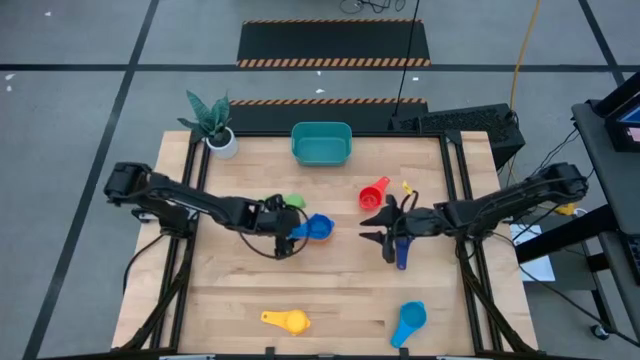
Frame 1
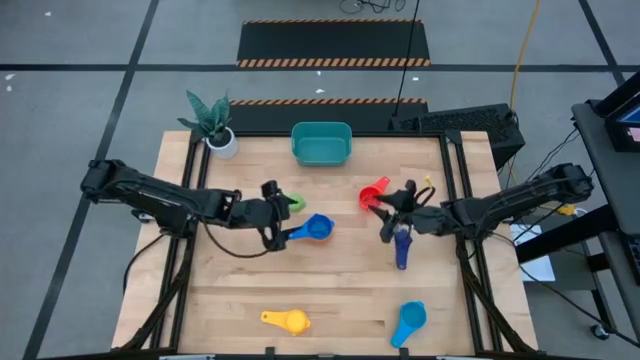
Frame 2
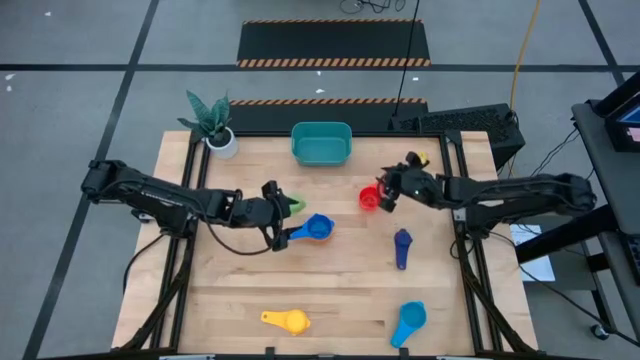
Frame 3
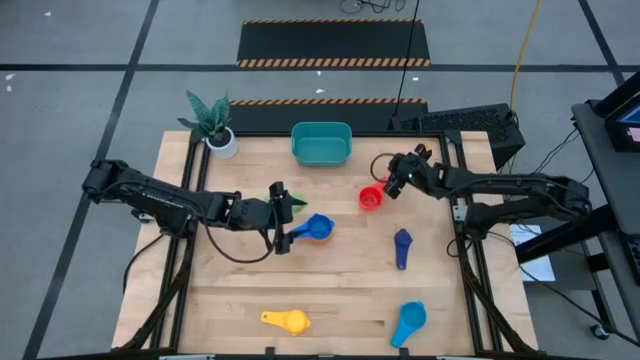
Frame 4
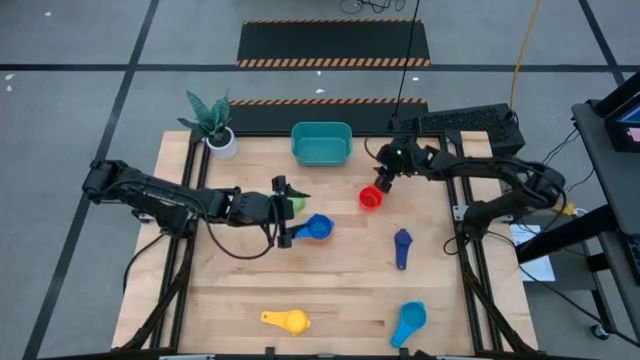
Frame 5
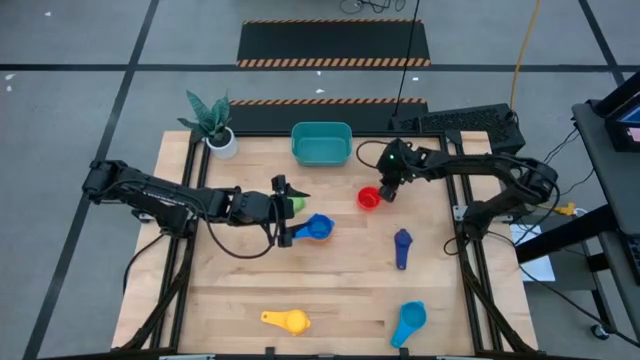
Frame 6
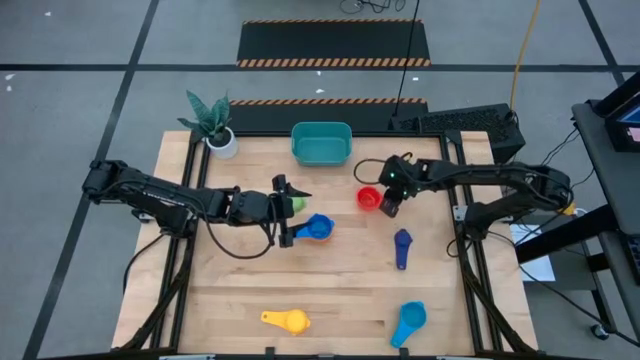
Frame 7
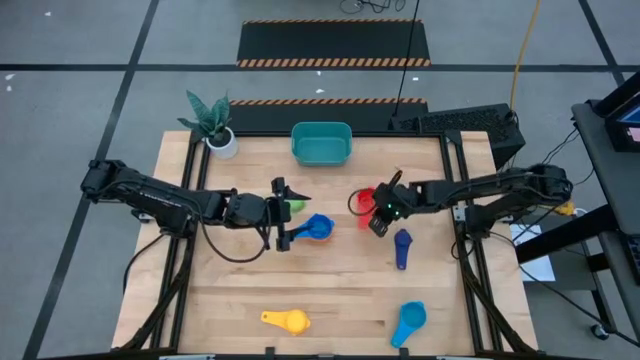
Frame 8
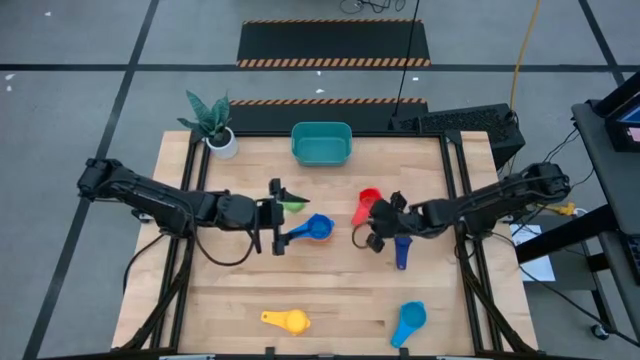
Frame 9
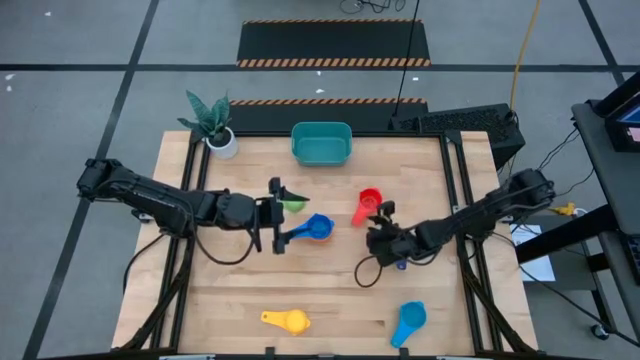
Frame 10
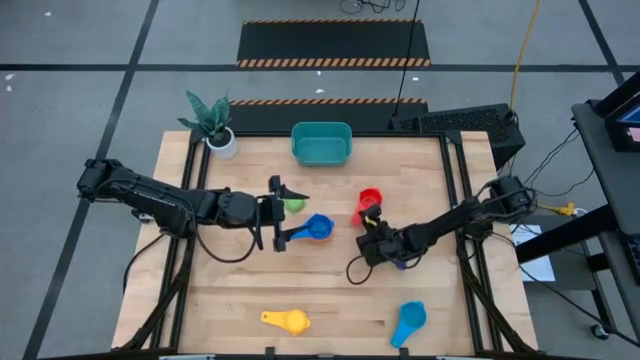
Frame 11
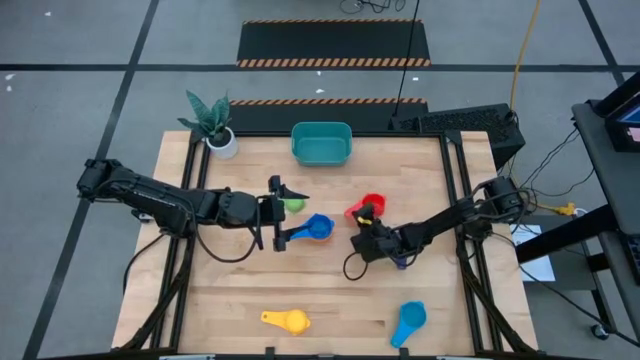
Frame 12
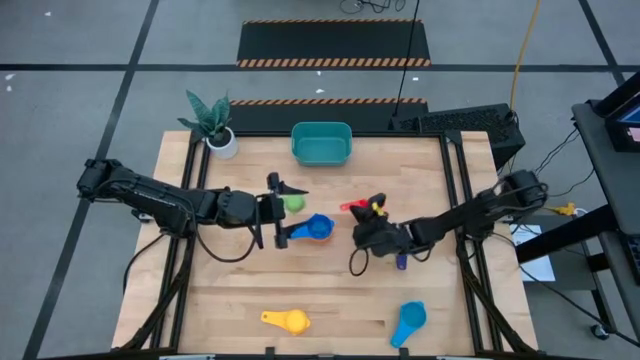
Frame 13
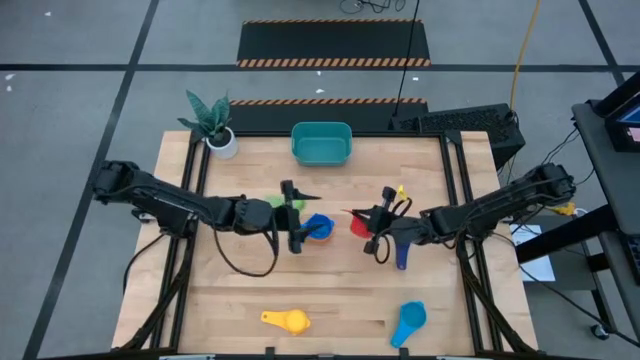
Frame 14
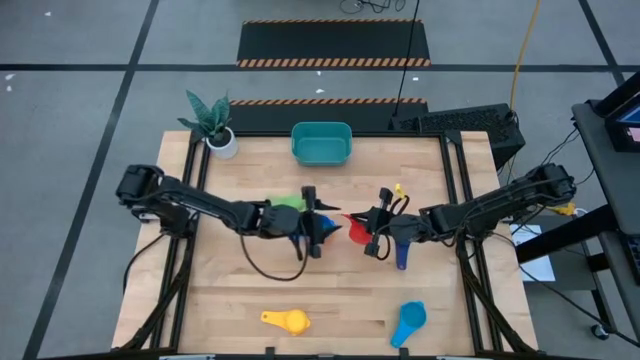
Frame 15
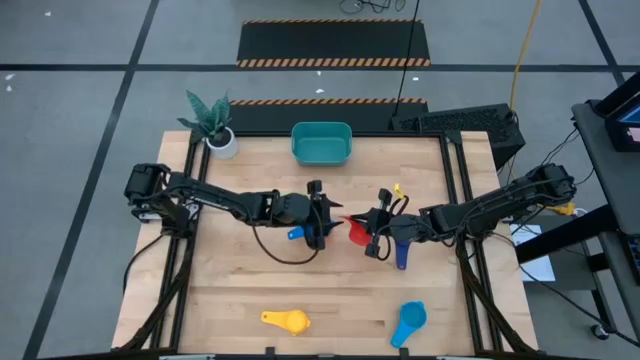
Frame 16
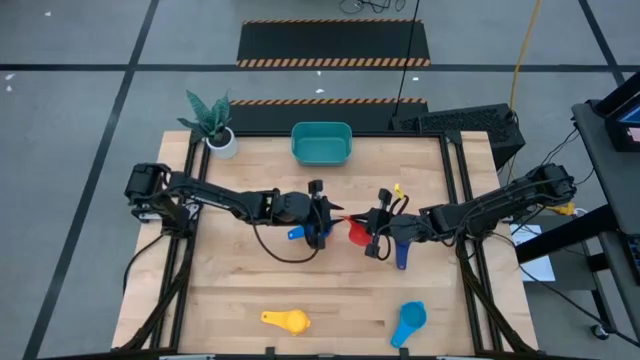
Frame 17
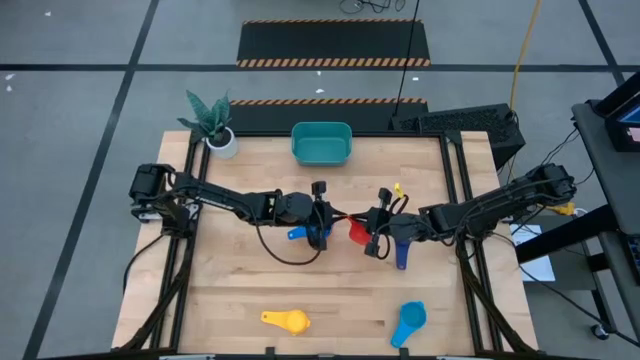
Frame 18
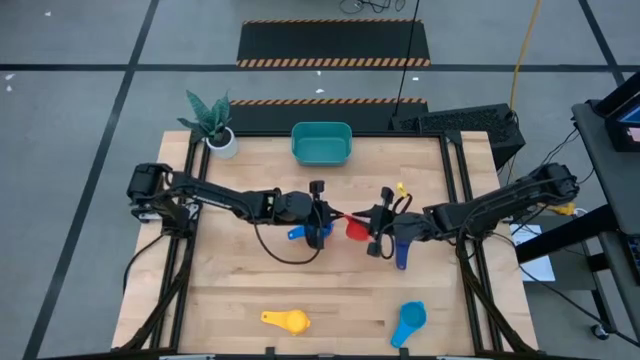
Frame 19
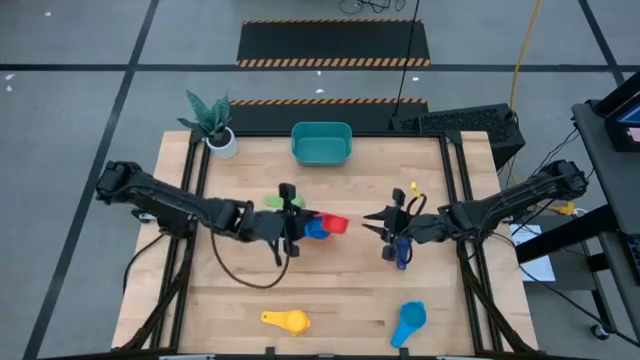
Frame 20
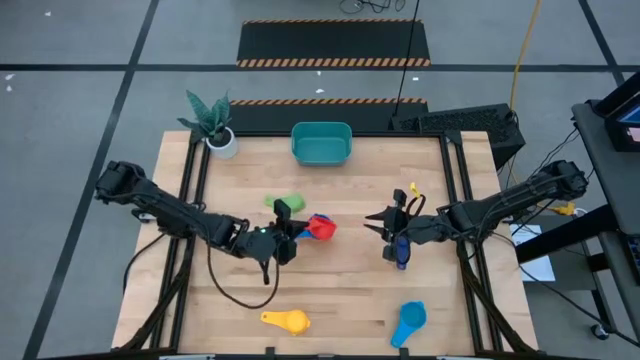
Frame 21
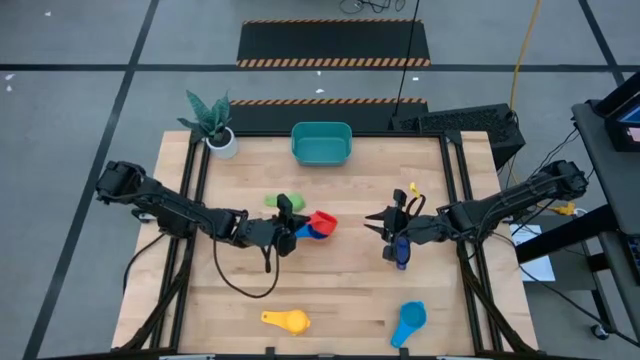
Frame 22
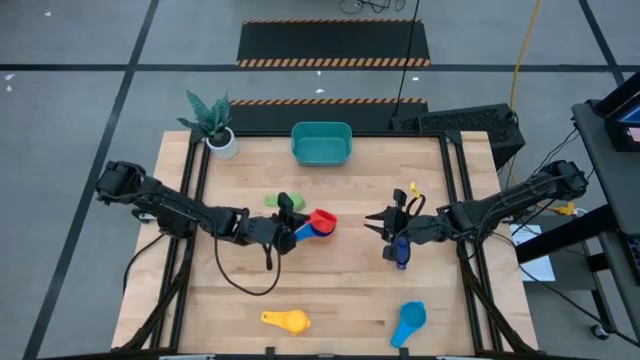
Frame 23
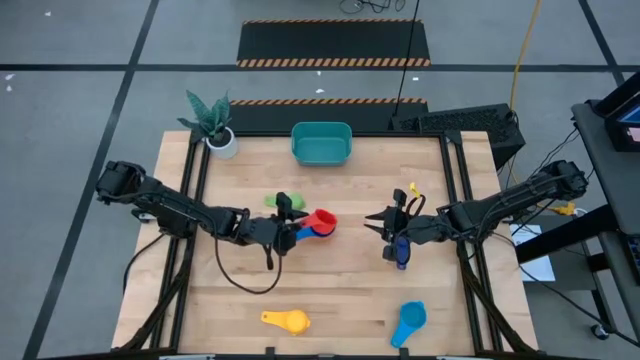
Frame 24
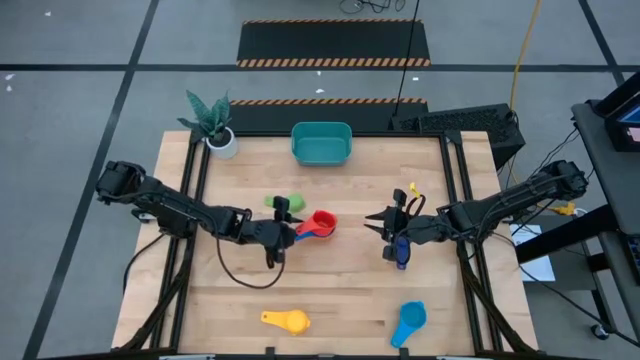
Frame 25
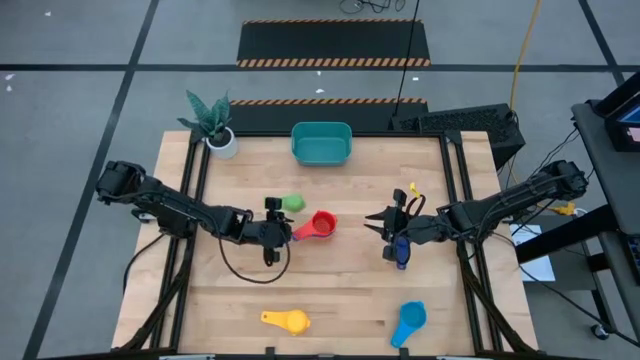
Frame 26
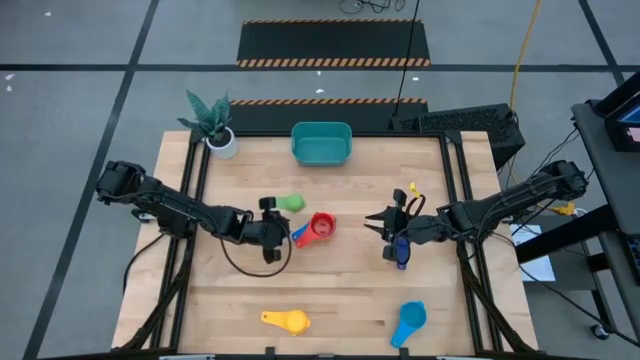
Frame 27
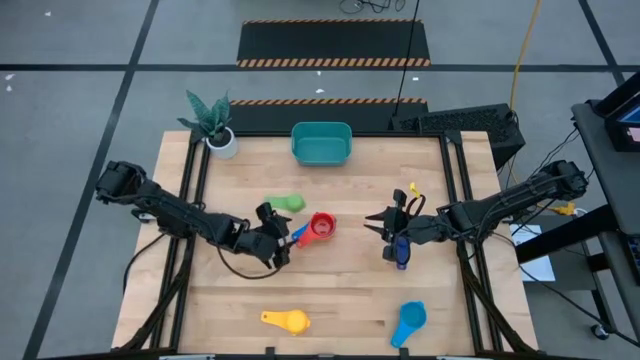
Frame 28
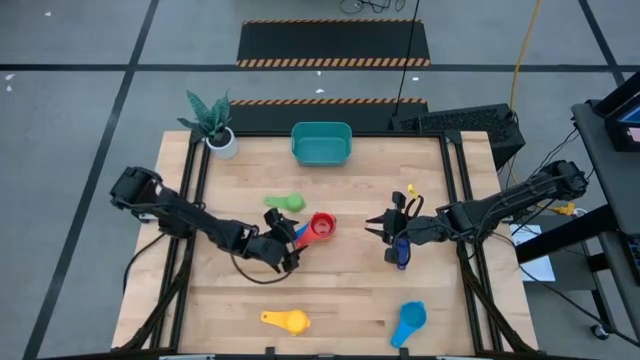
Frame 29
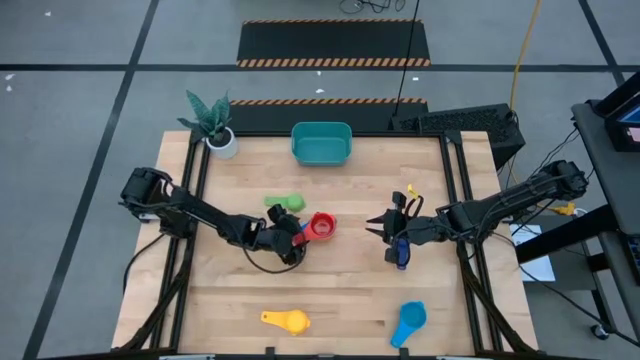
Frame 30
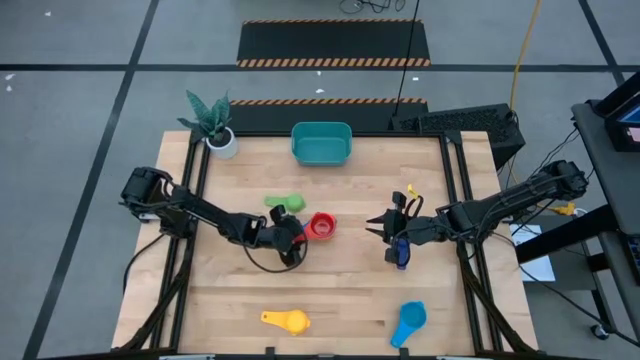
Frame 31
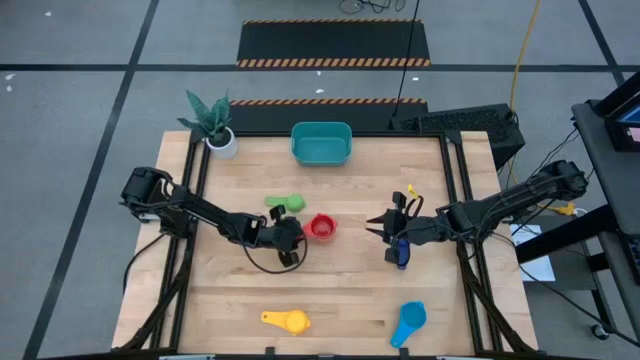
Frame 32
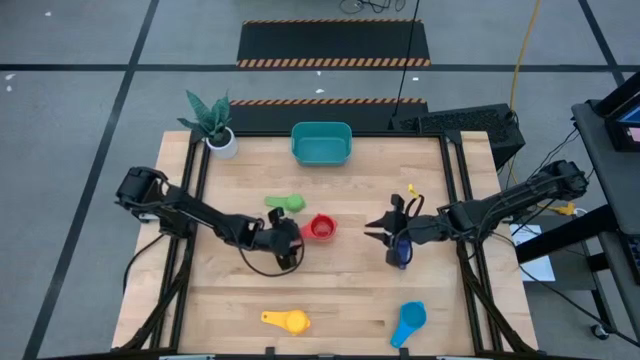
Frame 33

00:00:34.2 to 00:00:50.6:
Task: Nest measuring cups in basket
Stack the red measuring cup on top of the blue measuring cup

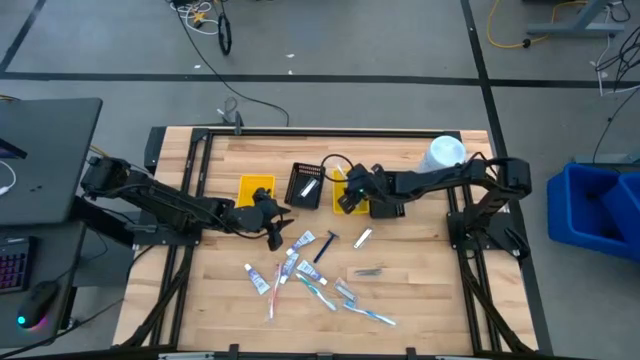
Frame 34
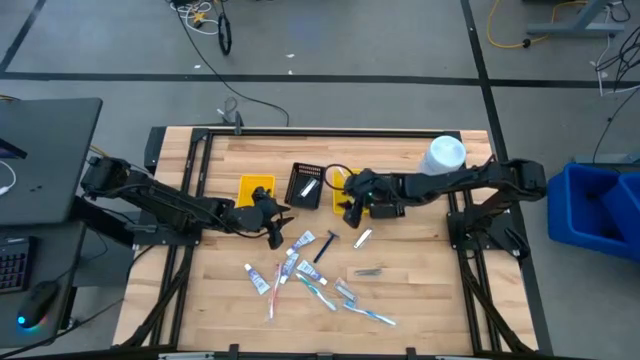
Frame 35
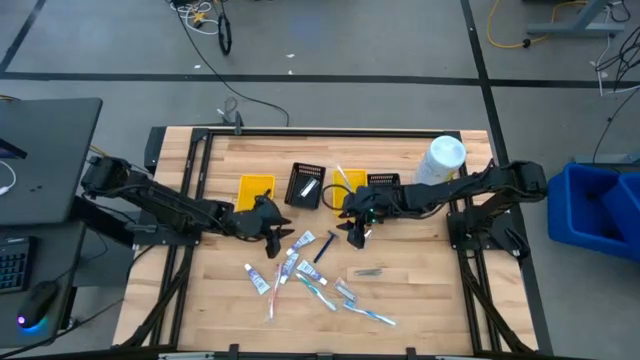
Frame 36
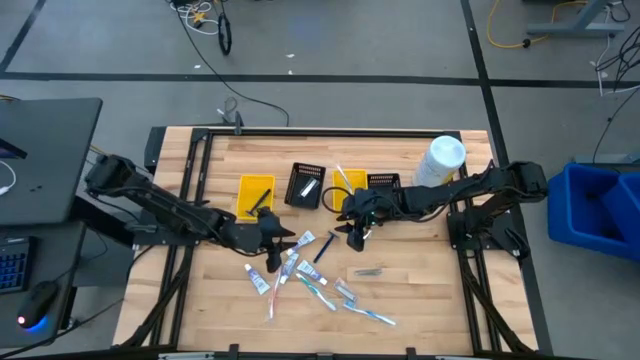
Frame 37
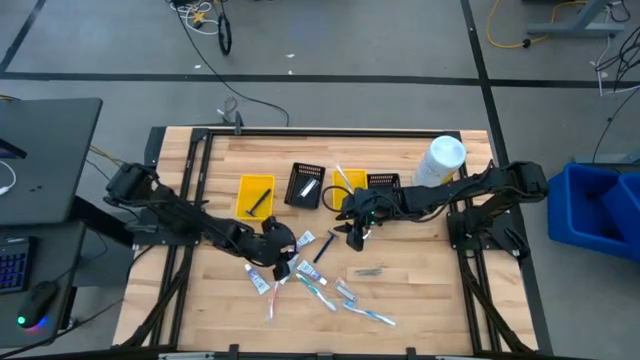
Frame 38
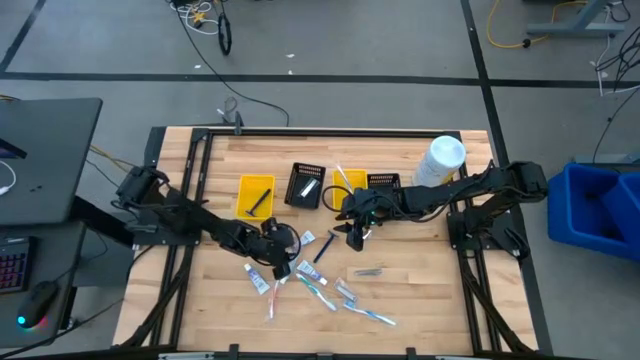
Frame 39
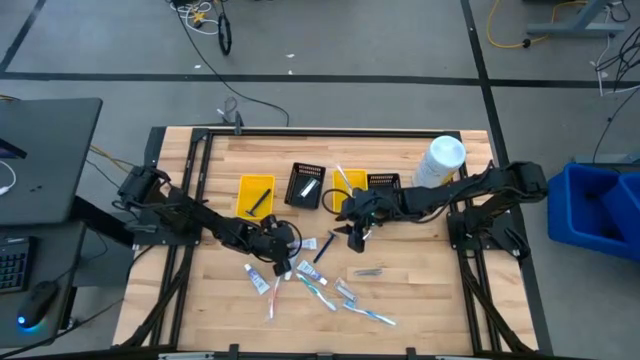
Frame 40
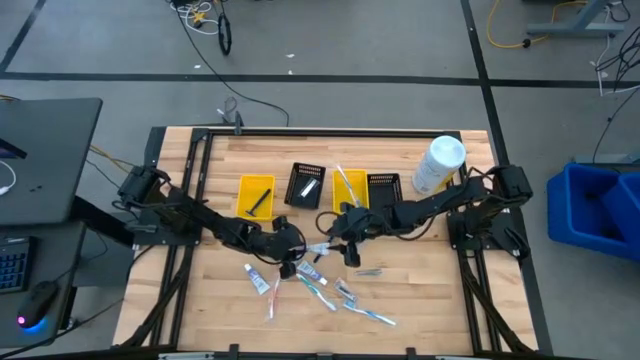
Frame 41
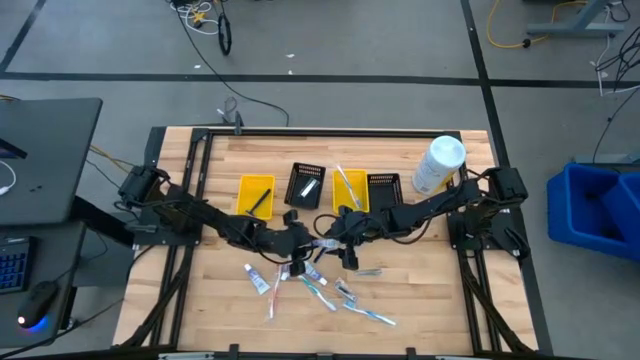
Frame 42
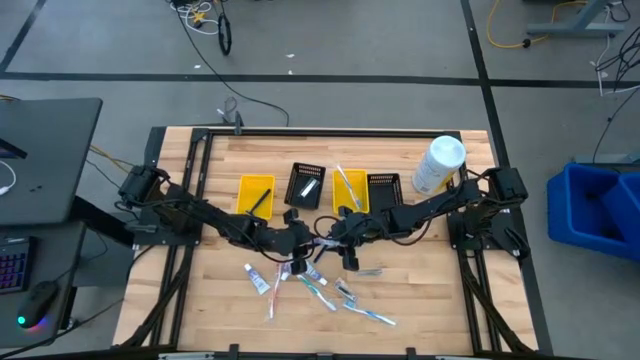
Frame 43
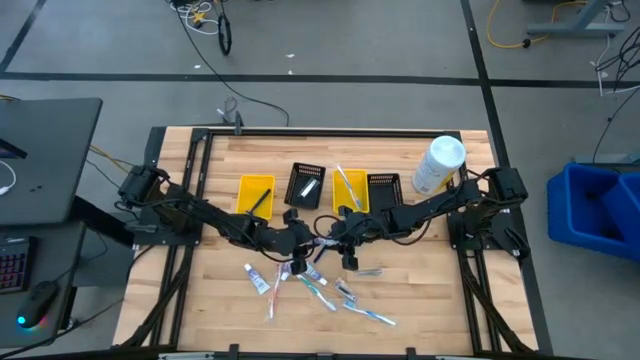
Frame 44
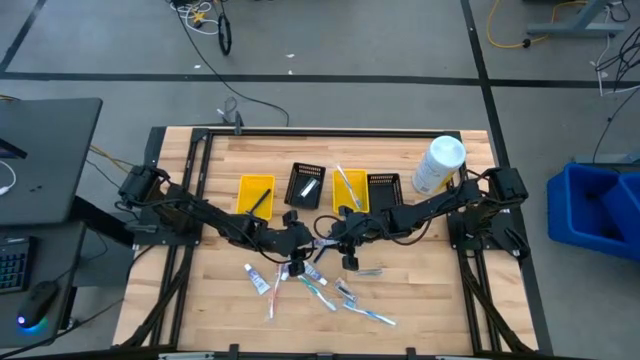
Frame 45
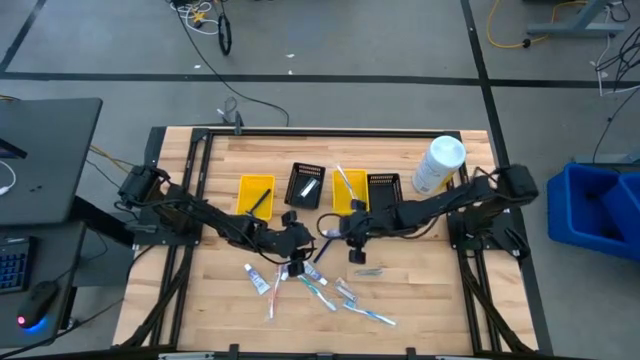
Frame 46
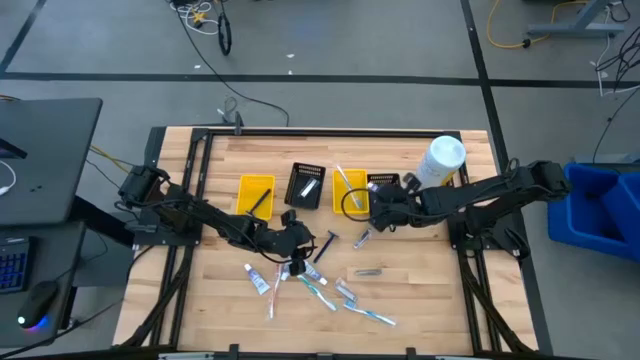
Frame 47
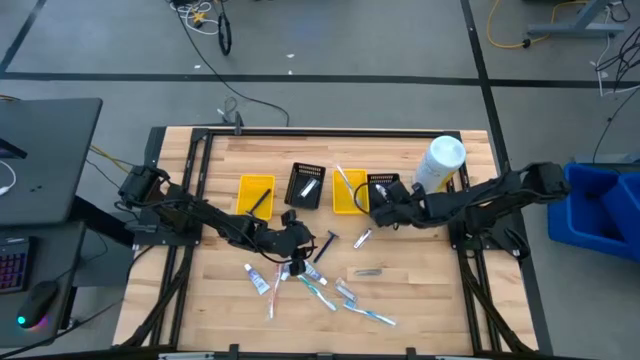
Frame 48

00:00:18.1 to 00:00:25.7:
Task: Pick & Place Travel size toiletries
Put the violet toothpaste into the right black bin
